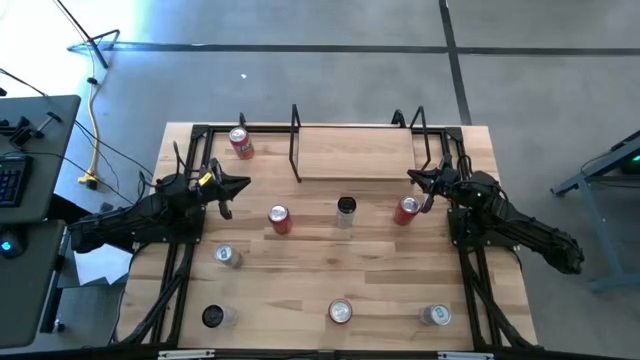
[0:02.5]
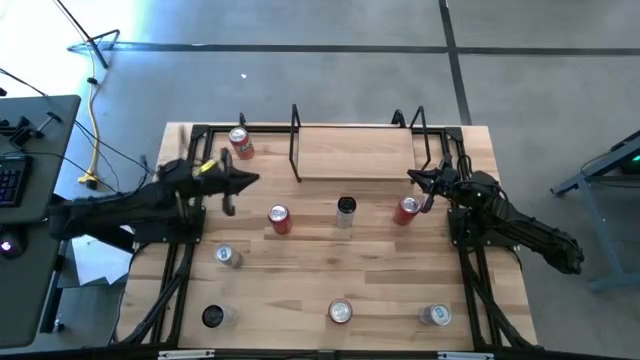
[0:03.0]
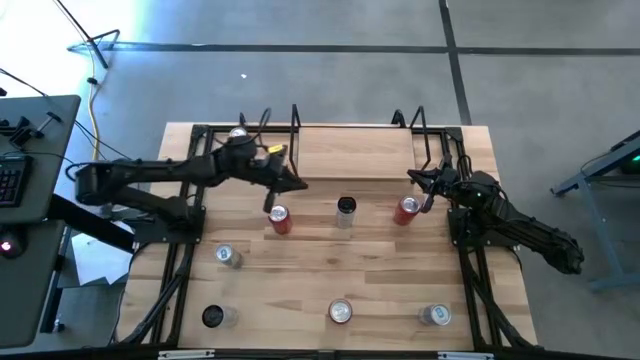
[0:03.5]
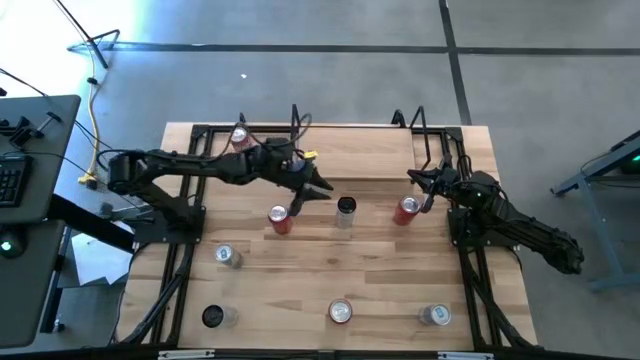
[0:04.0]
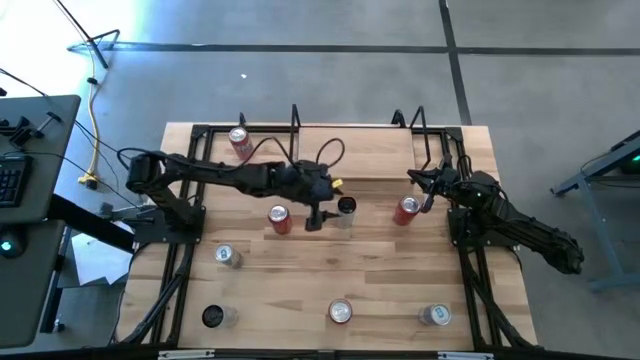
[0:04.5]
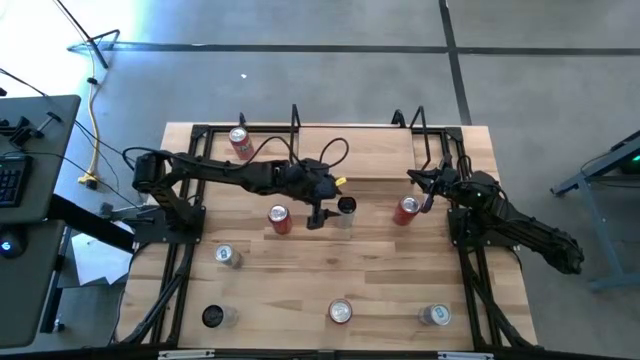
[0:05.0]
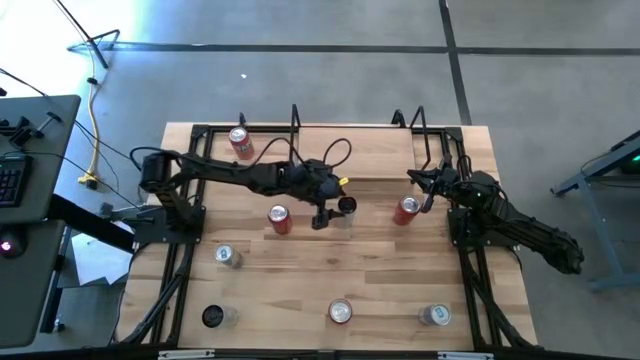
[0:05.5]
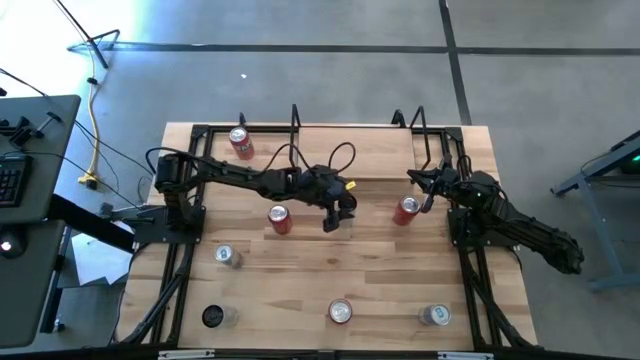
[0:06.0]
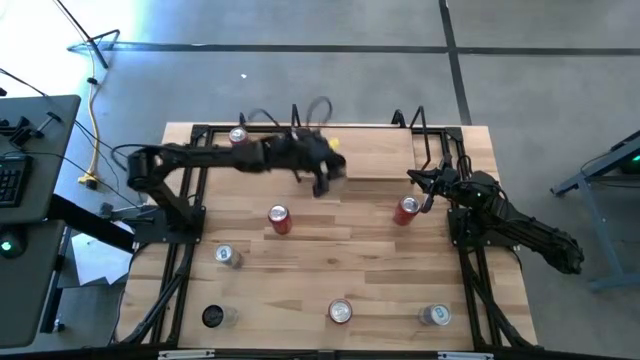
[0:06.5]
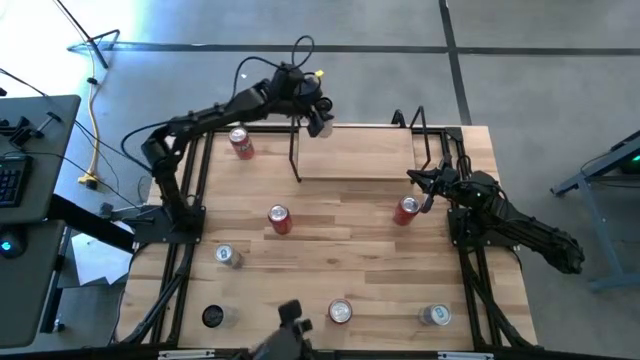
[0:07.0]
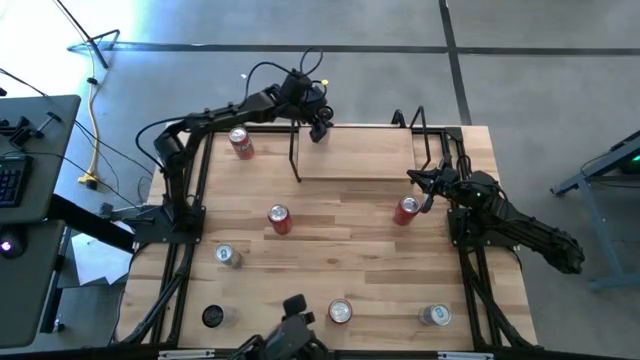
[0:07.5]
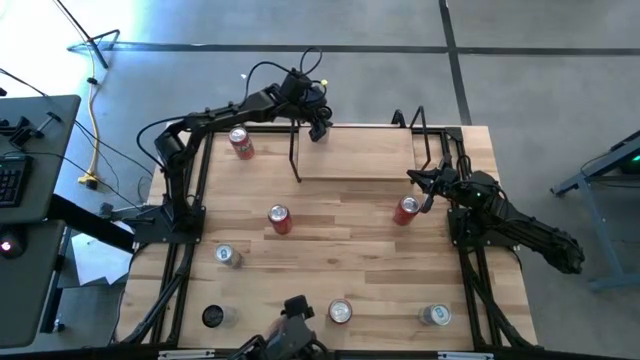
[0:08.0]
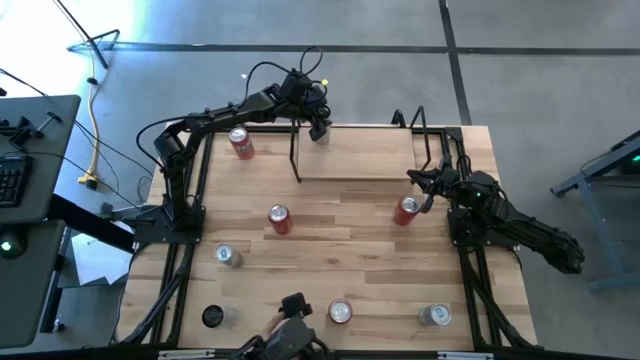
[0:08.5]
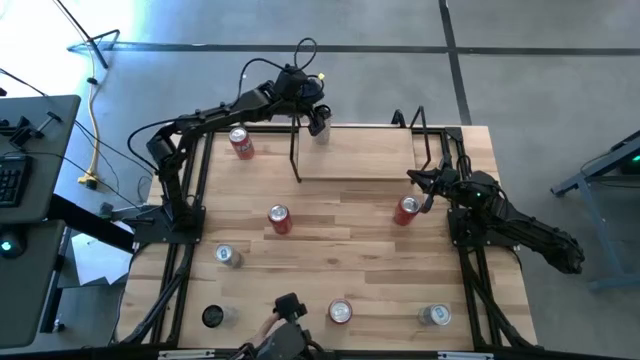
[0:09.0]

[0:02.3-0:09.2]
Task: Place canned beverage on shelf
Put the top white-yellow soda can on the shelf

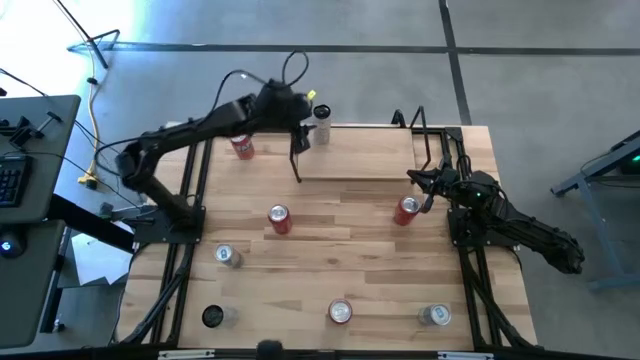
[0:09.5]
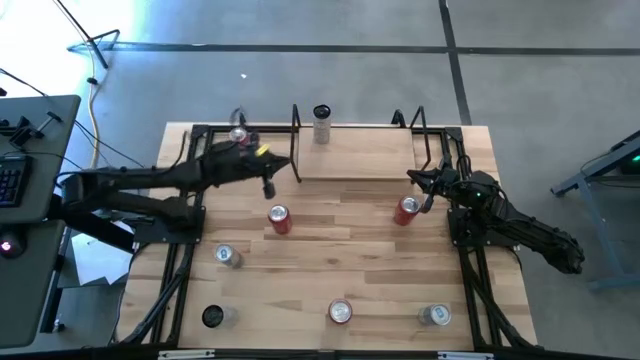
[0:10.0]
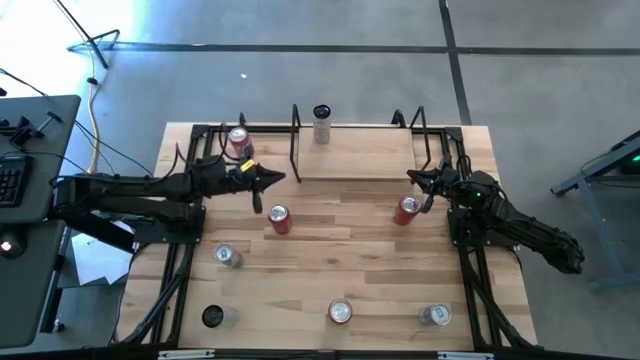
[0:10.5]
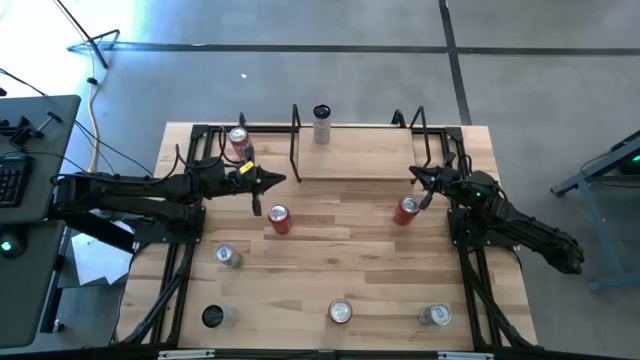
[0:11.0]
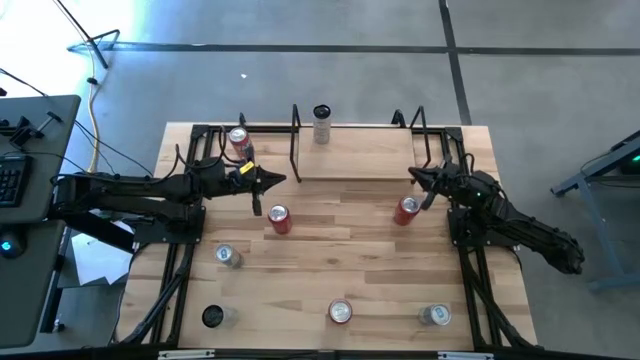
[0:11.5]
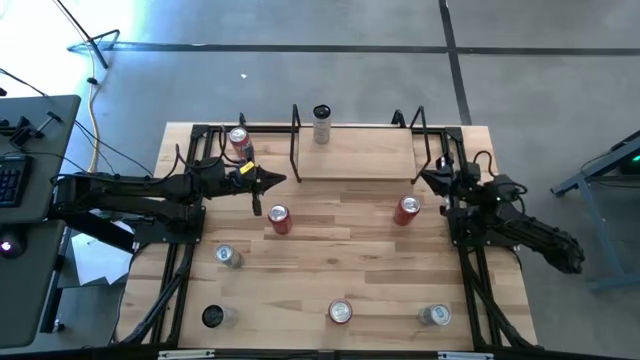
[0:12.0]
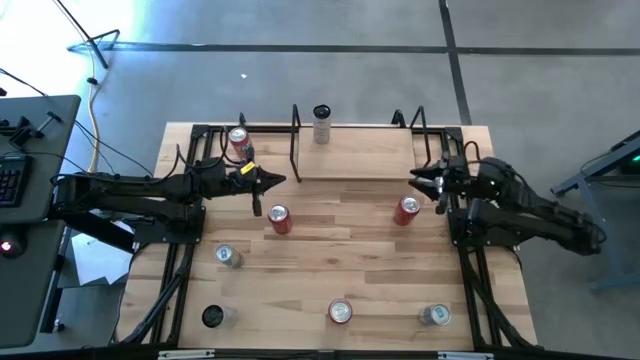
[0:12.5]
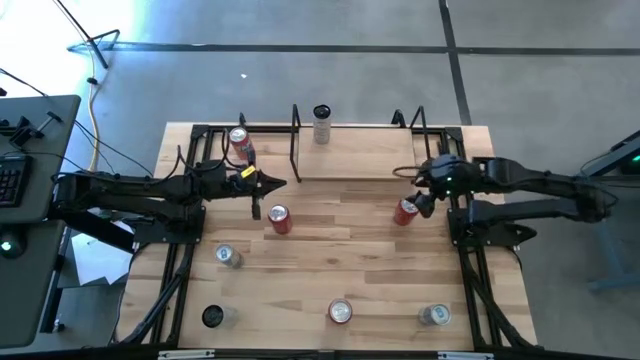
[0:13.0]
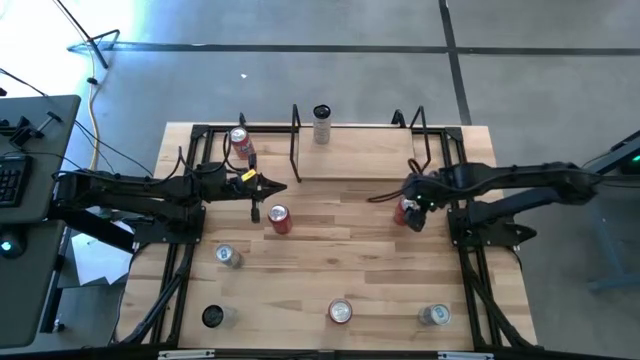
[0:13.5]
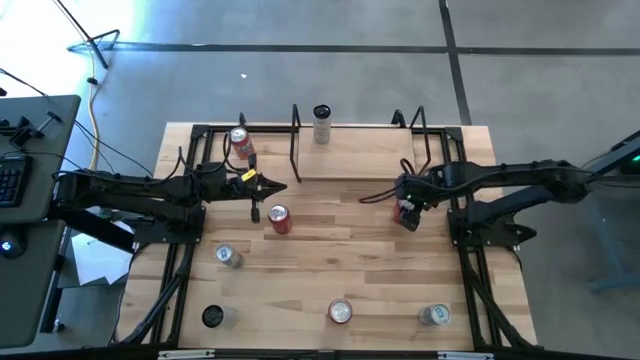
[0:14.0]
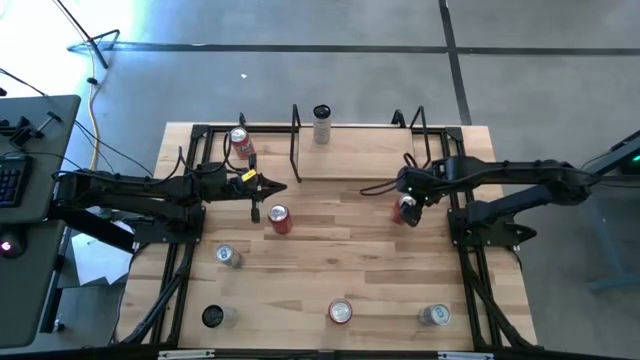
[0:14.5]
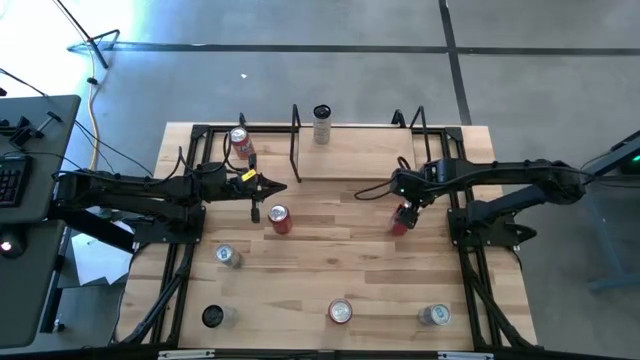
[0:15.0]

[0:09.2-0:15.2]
Put the right red soda can on the shelf

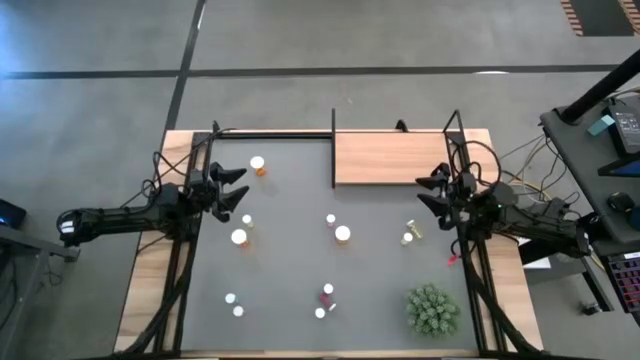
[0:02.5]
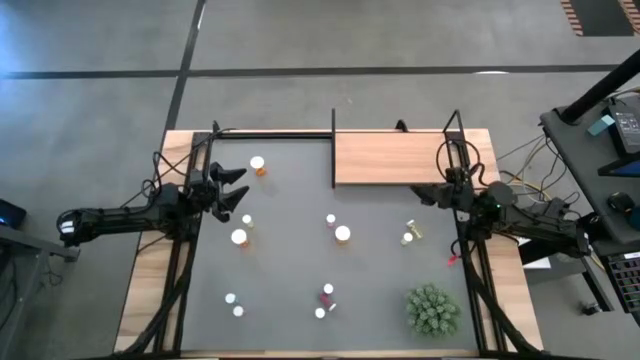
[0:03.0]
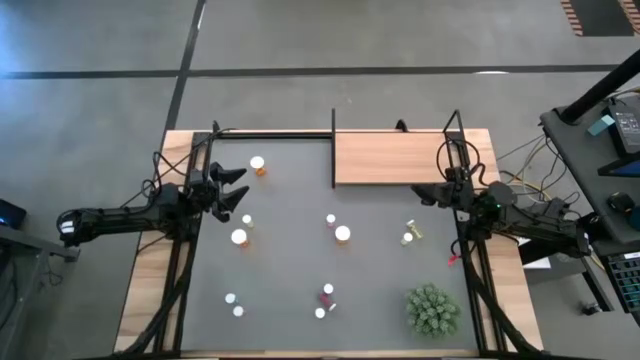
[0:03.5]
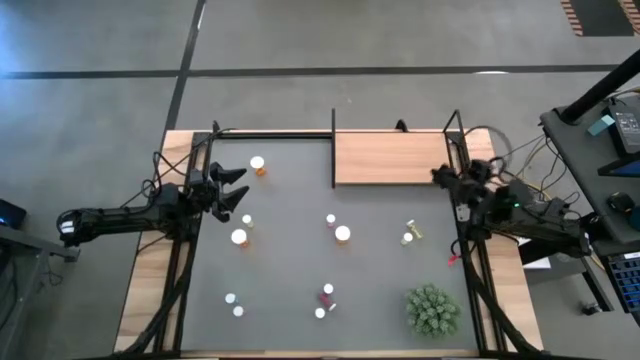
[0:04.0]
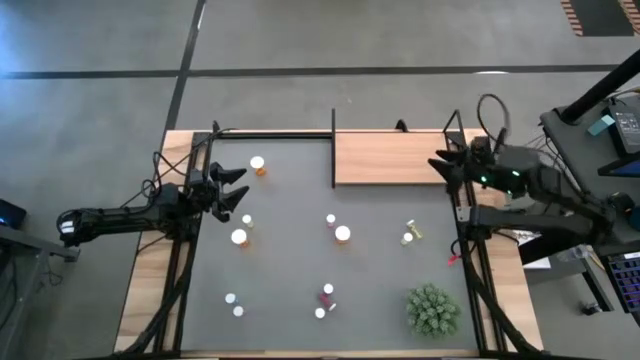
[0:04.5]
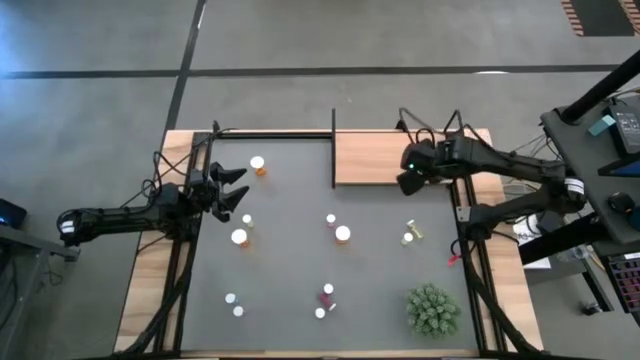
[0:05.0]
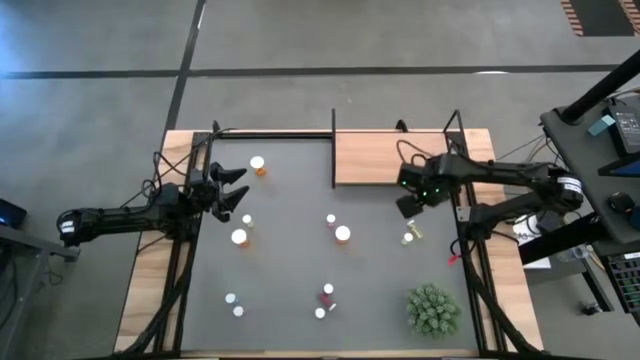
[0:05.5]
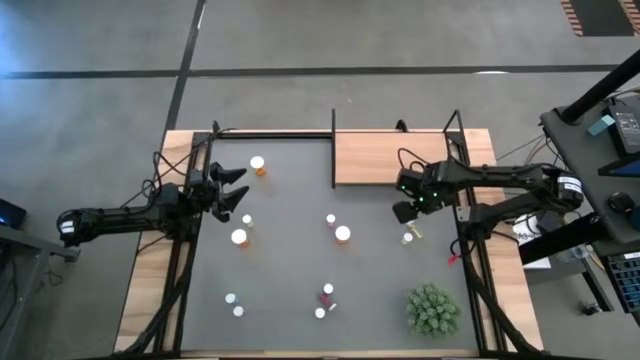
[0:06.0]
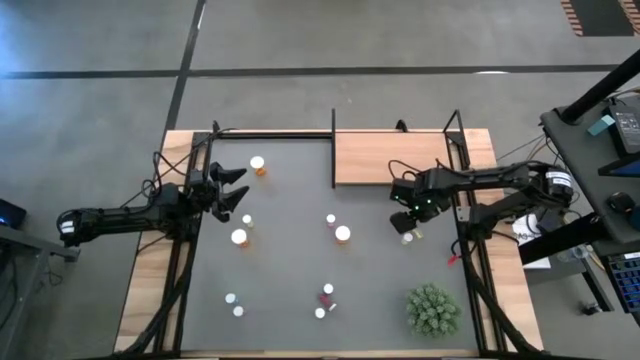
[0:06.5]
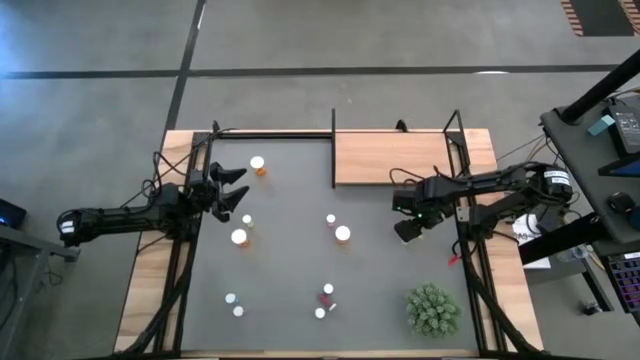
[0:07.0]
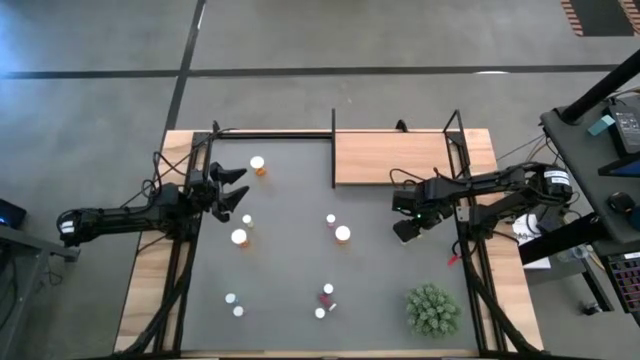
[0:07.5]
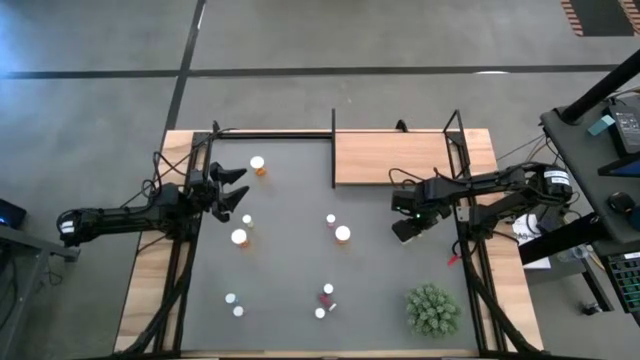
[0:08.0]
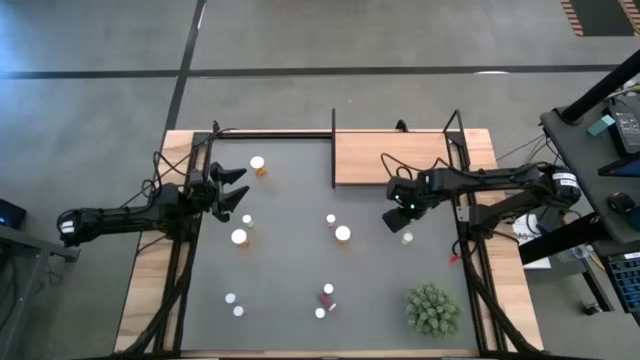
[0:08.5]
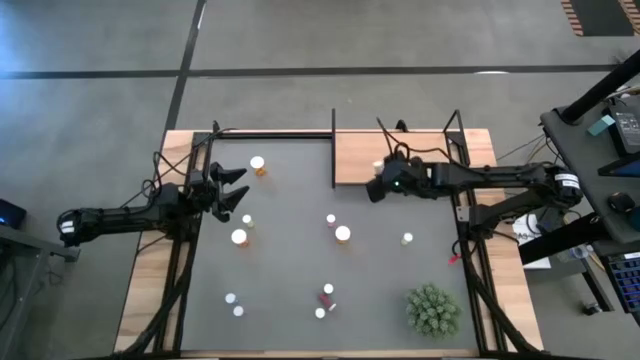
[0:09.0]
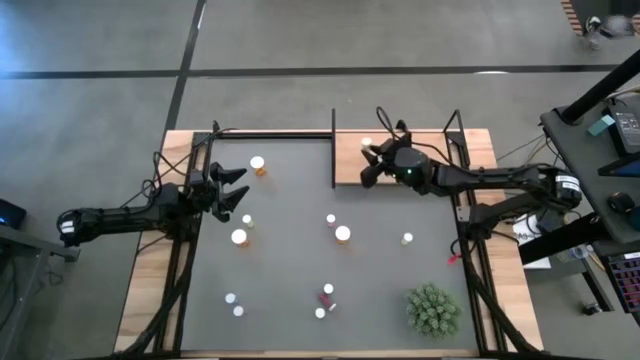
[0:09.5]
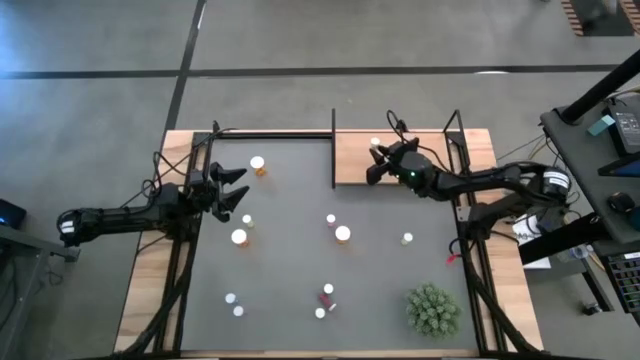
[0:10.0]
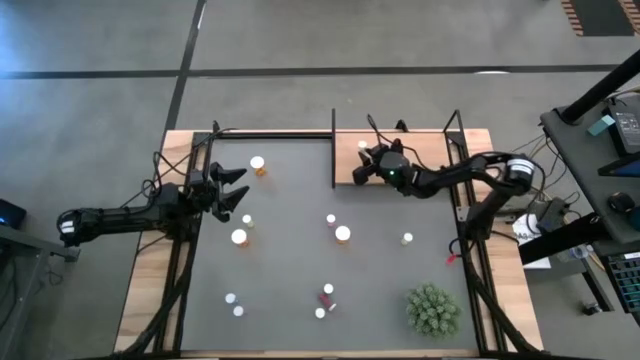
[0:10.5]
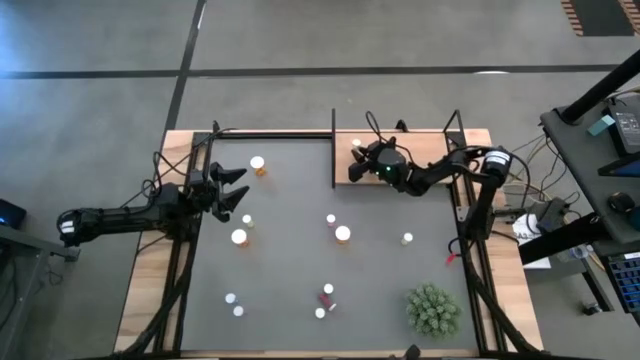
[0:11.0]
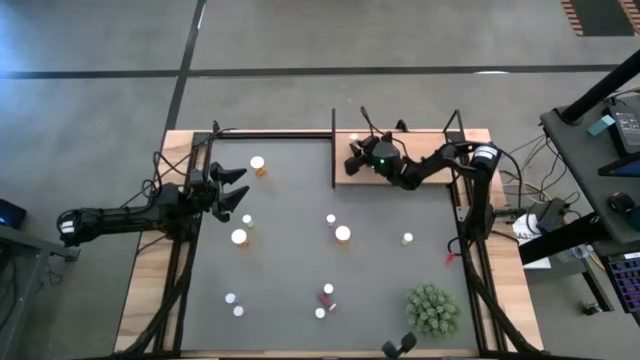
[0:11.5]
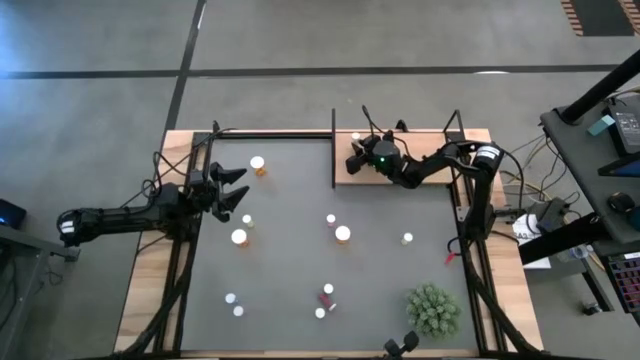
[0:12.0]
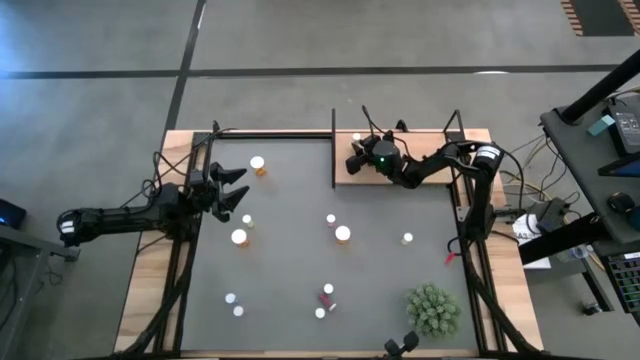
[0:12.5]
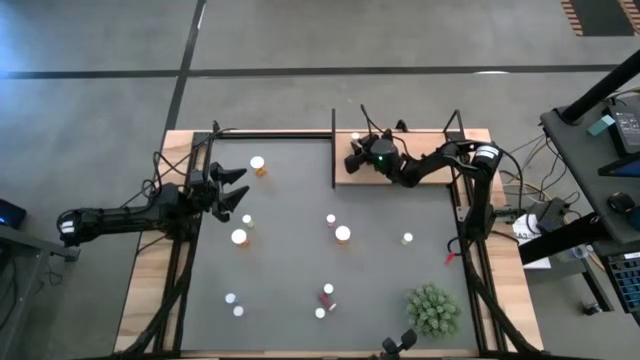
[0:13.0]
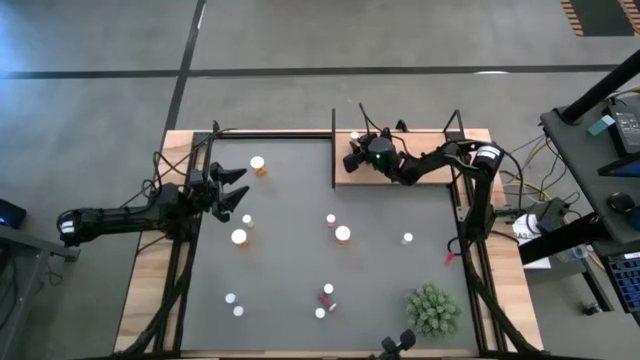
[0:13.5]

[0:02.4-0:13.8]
Task: Pick and place medicine bottles onto shelf by color
Put the top right yellow medicine bottle on the shelf
